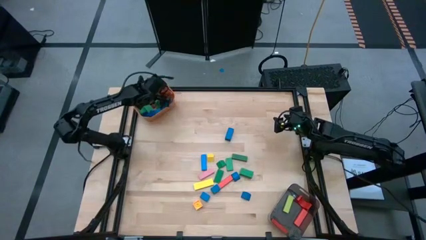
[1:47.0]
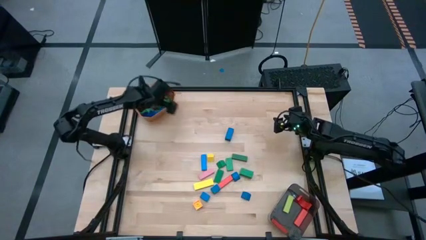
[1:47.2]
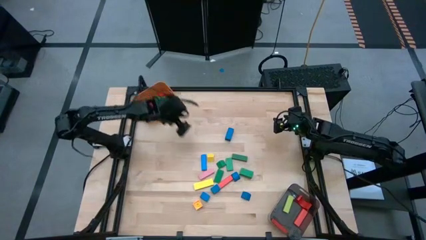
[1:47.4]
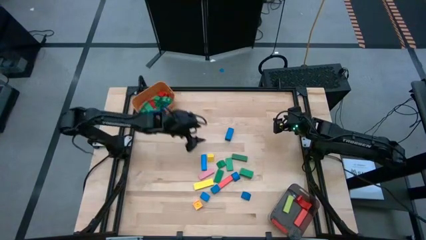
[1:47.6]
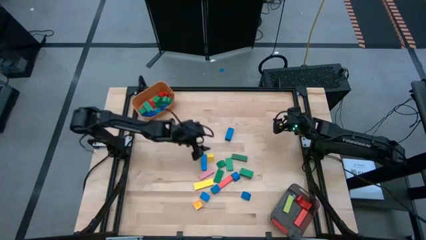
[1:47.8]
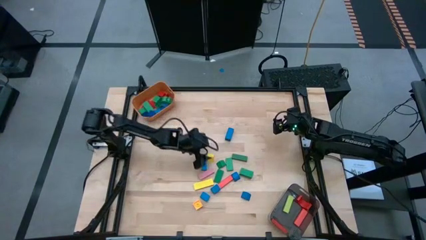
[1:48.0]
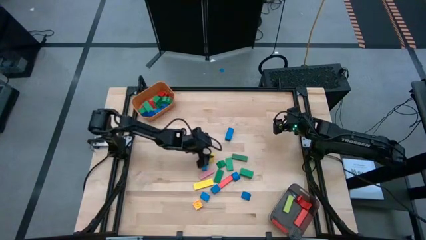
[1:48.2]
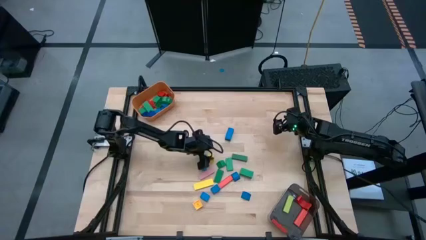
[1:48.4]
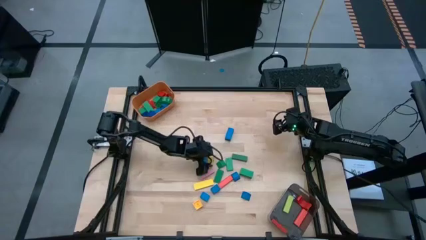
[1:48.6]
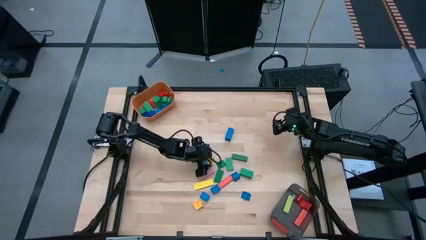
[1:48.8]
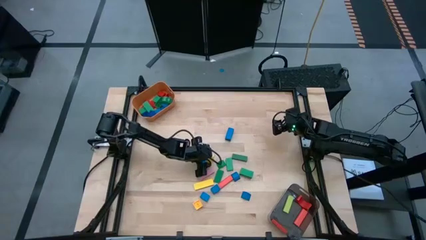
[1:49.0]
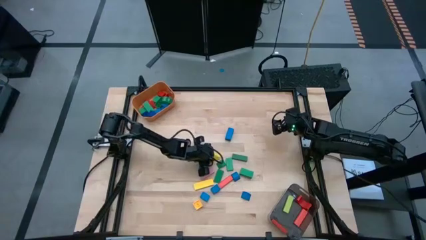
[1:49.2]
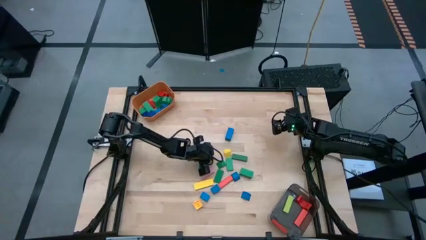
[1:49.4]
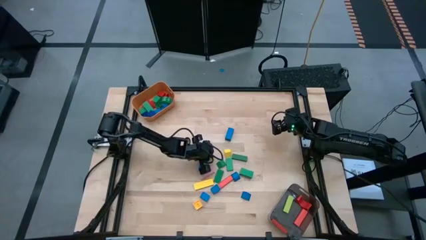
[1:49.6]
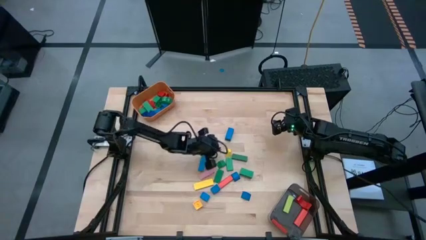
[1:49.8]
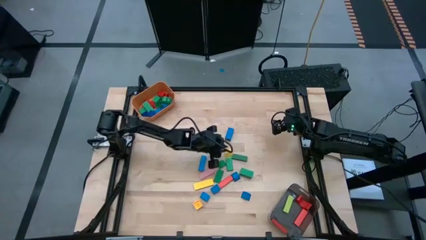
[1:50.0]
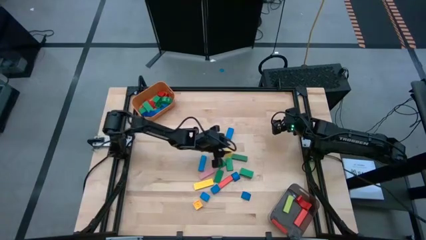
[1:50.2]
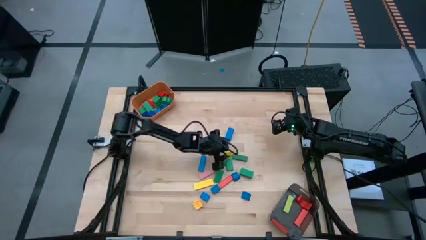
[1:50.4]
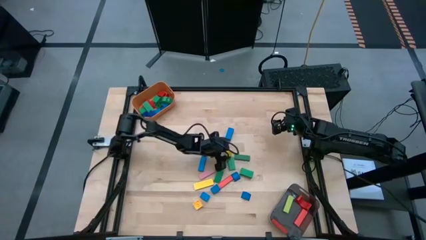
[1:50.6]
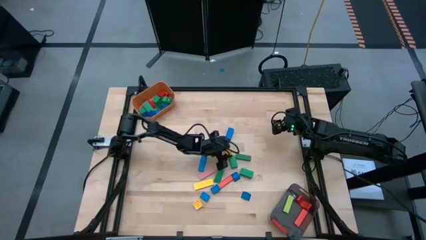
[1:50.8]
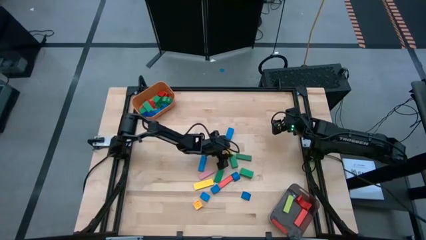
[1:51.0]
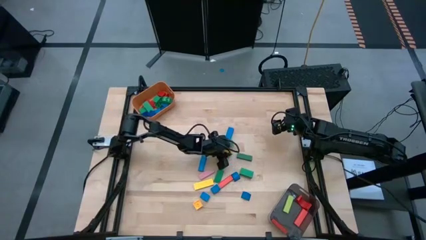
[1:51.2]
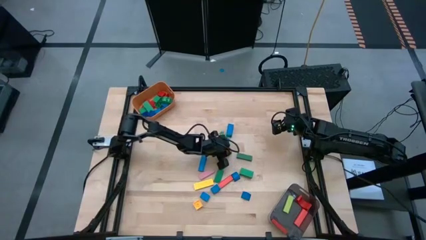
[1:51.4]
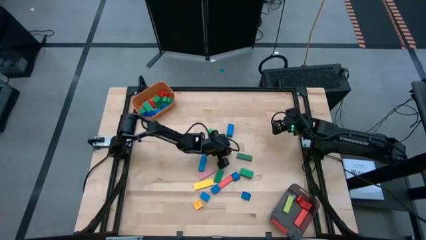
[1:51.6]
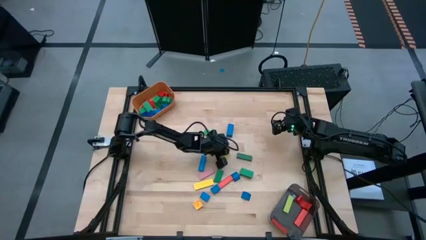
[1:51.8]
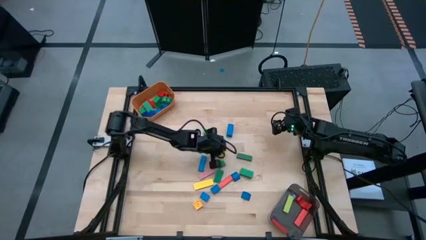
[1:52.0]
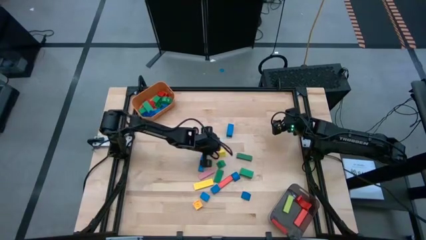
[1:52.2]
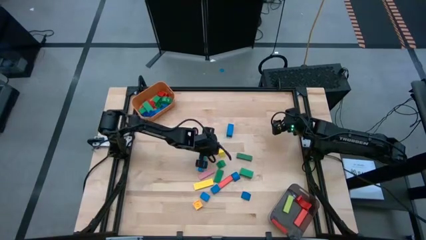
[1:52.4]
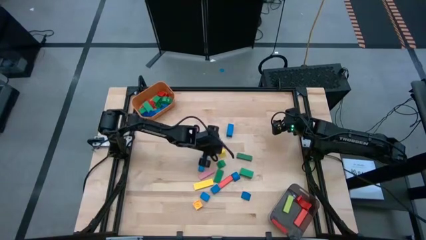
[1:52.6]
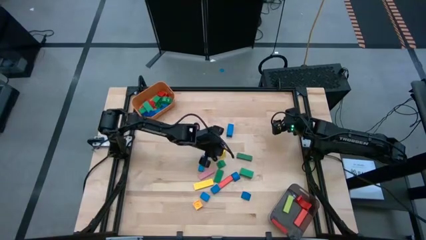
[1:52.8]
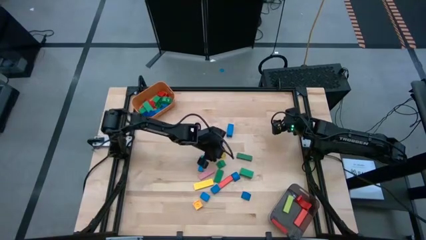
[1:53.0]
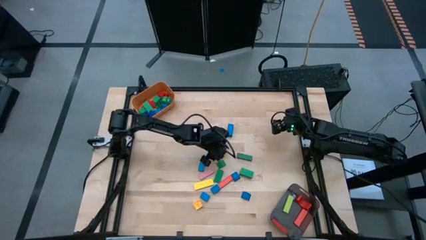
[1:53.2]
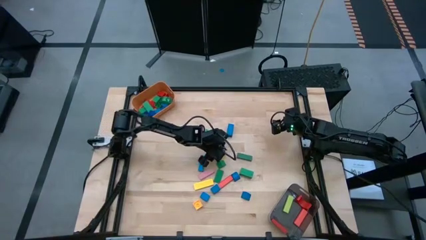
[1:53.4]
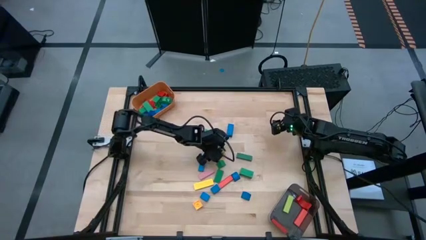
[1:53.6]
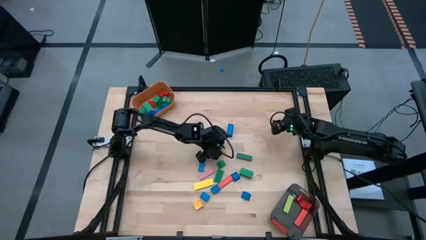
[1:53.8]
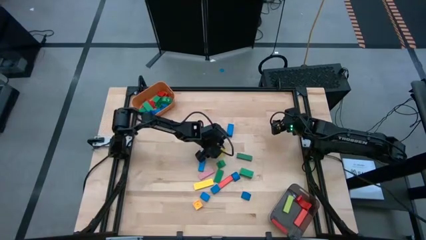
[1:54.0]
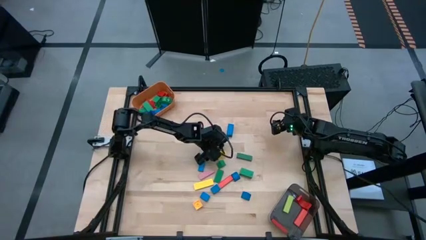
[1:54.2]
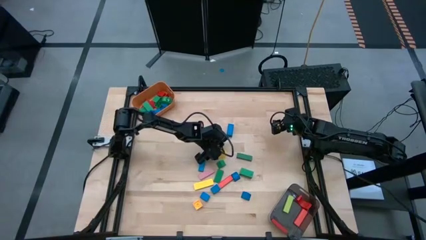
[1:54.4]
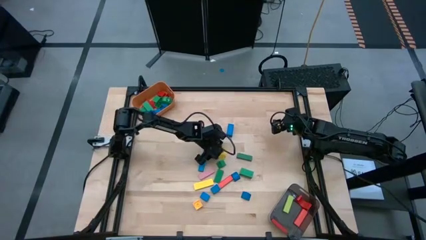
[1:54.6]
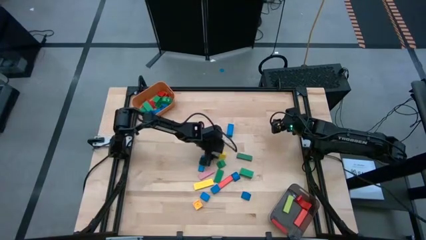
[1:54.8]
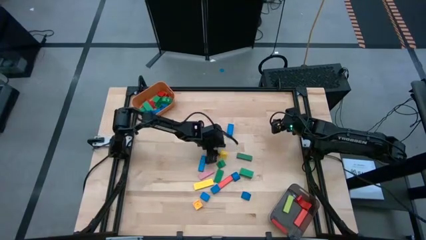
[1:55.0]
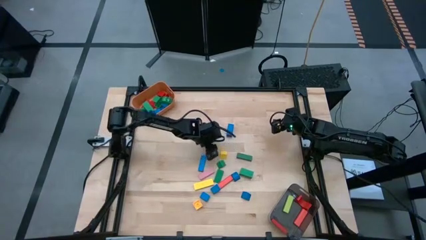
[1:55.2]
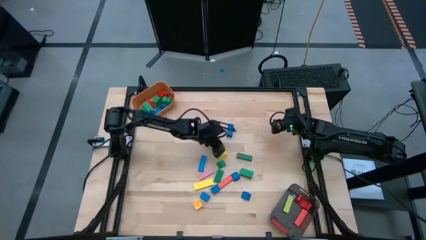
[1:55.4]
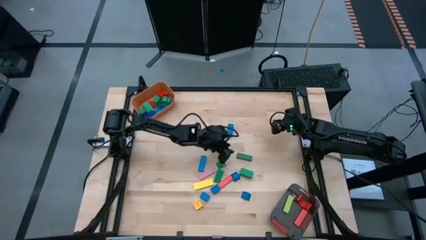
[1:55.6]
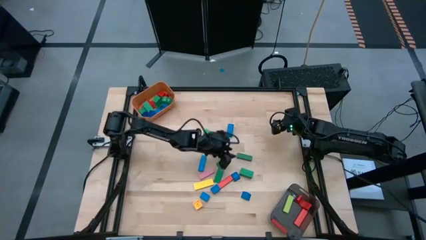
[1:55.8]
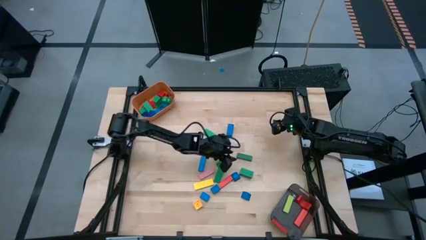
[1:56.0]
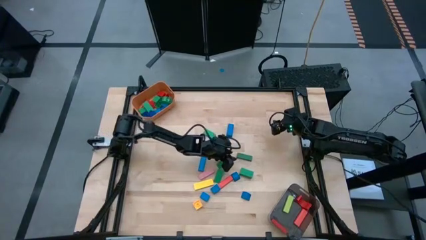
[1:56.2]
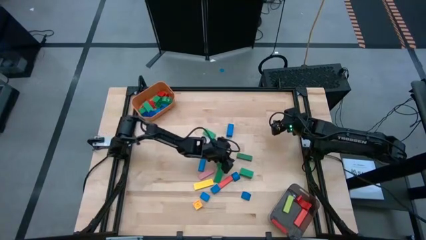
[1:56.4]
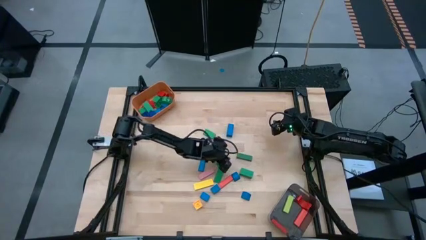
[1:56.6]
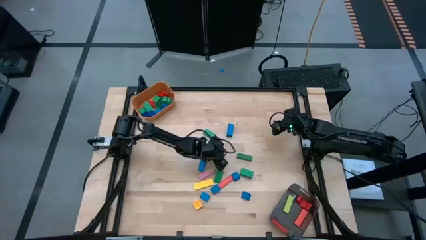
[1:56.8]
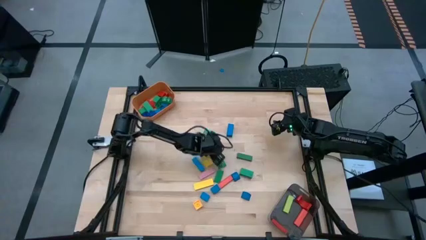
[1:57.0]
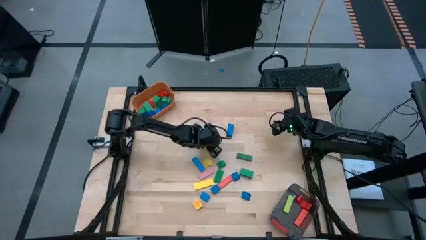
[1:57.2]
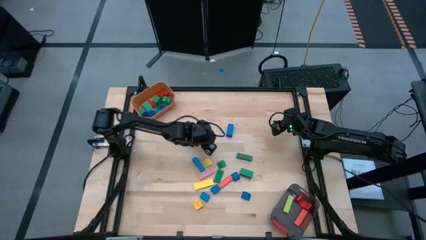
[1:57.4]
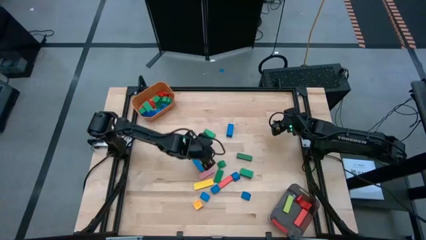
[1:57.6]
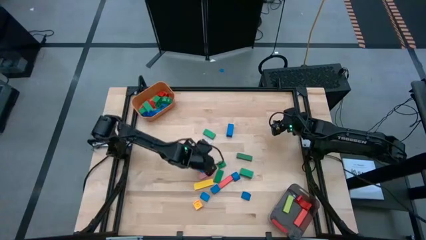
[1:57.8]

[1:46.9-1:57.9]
Task: Sort blocks by size
Put the small yellow block into the orange bin

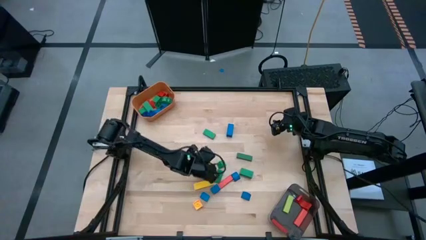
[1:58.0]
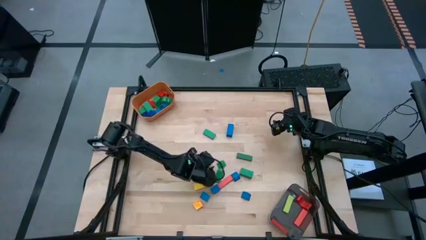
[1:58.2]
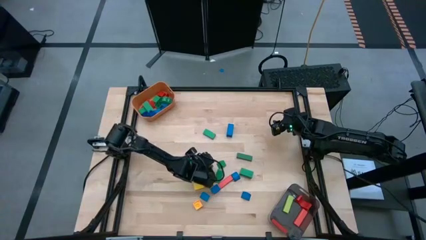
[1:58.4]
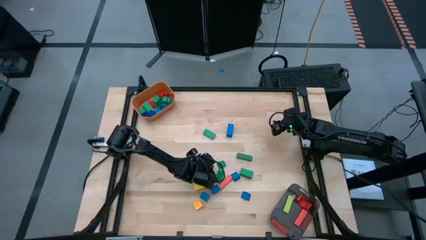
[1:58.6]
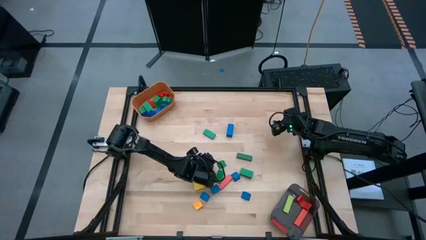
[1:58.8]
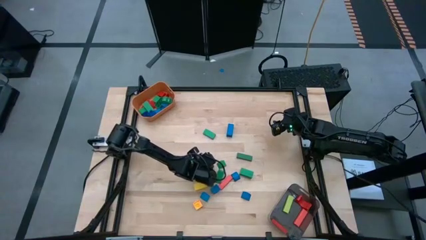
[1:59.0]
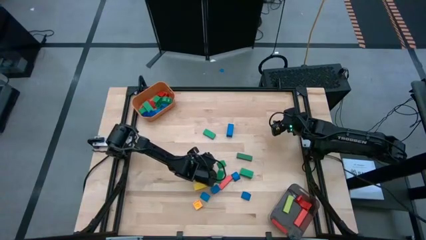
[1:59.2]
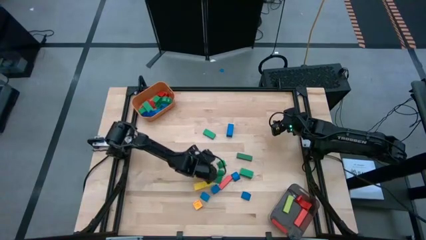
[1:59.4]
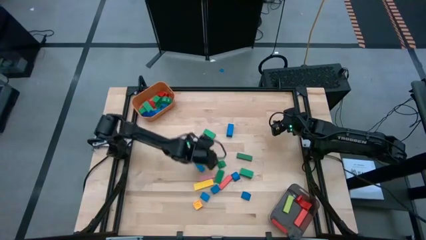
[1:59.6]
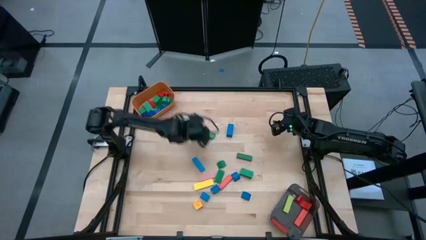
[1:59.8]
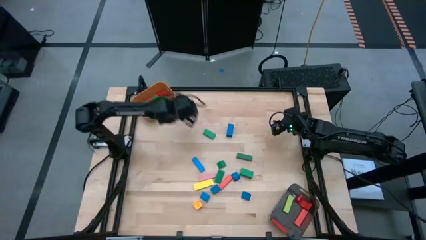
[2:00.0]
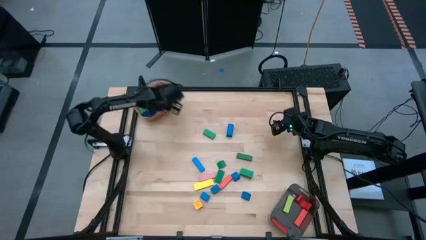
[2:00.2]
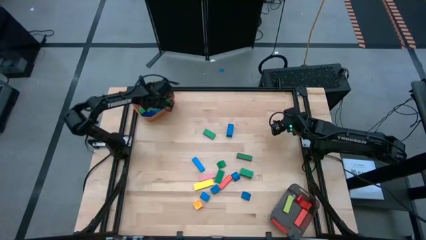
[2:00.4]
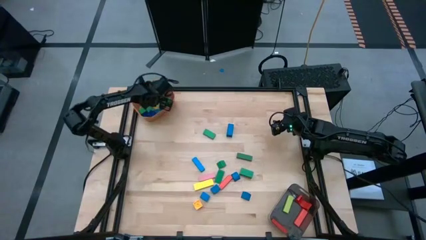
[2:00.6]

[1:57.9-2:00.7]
Put the small yellow block into the orange bin

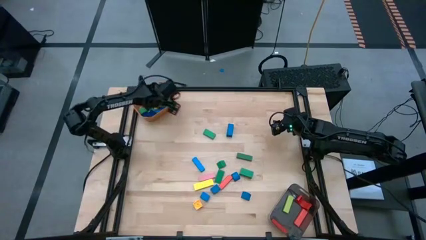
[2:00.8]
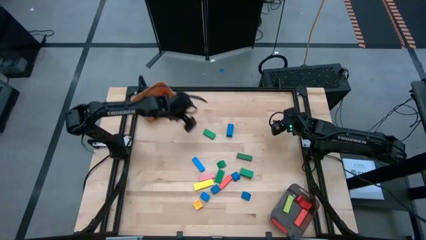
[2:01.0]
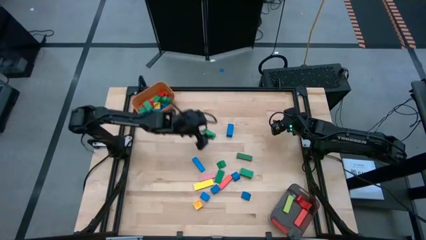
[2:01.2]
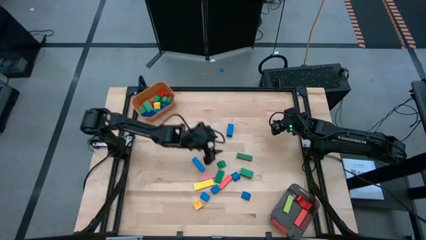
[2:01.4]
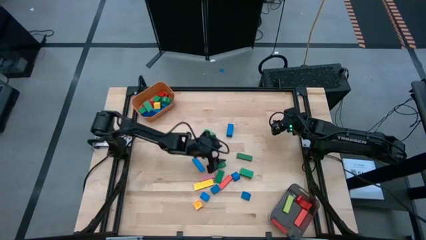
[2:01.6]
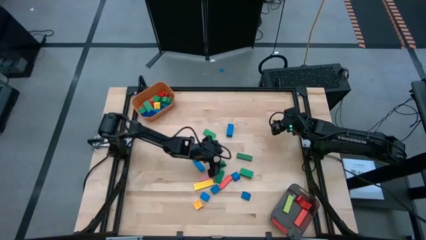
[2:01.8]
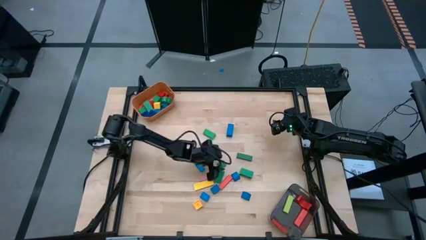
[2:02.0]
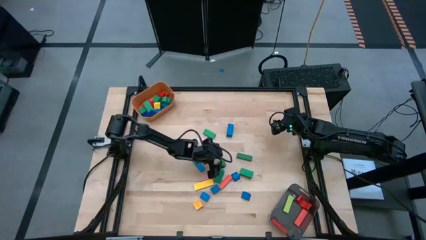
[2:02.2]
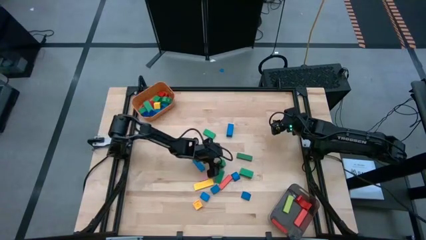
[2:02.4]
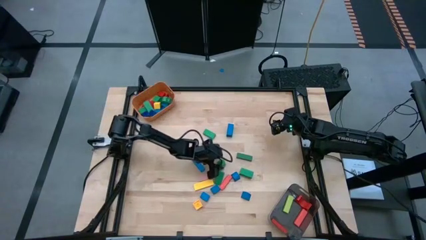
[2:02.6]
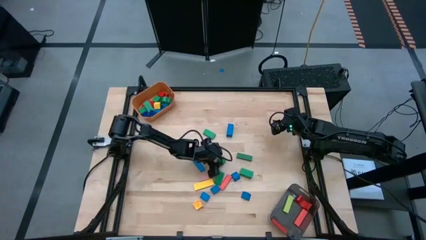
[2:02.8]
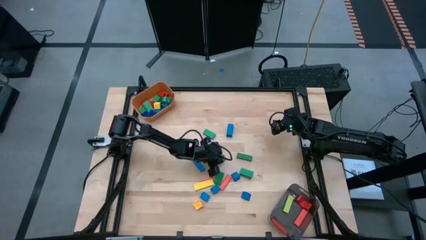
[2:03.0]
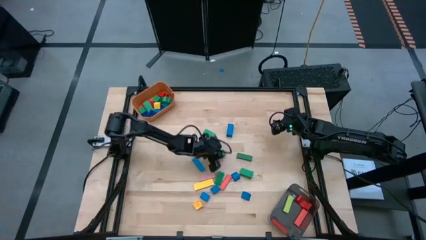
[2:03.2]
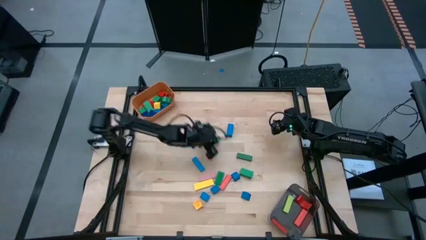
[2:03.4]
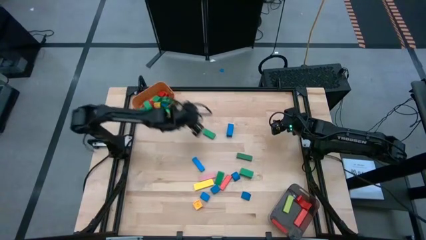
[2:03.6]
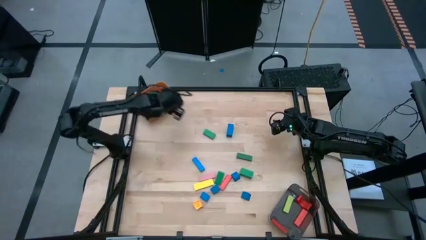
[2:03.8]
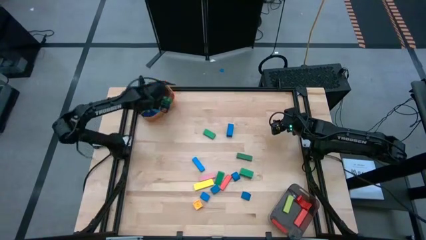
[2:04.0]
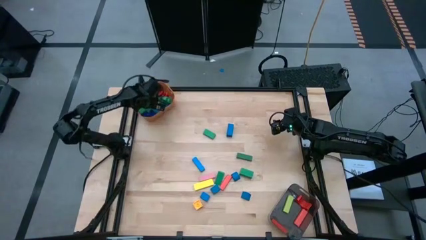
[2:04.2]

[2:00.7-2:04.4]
Put the small green block into the orange bin
